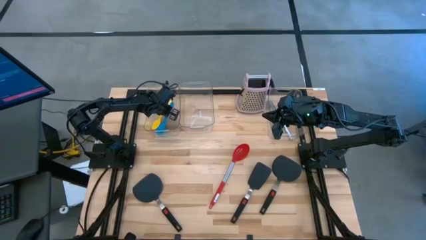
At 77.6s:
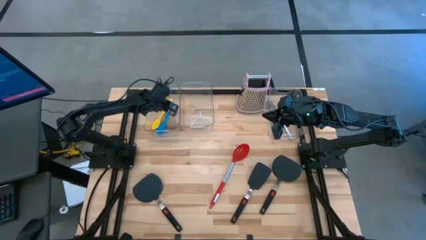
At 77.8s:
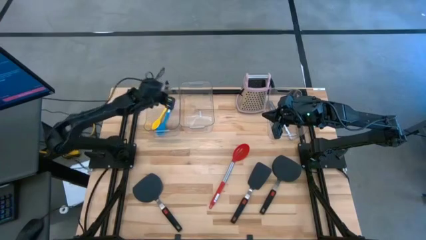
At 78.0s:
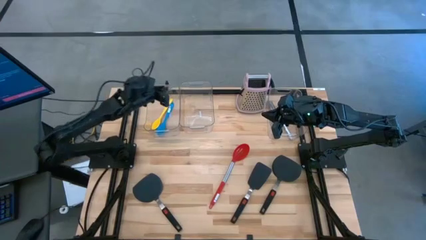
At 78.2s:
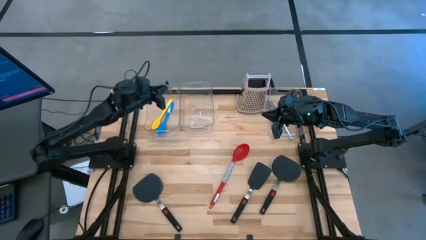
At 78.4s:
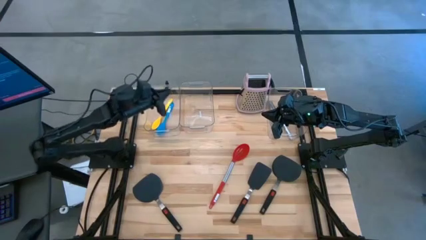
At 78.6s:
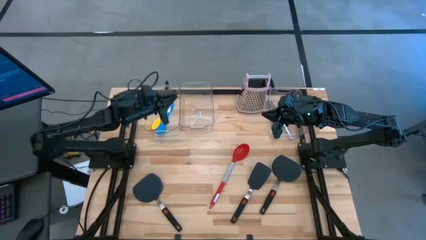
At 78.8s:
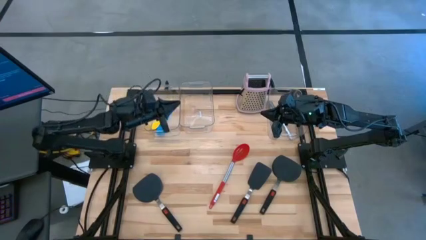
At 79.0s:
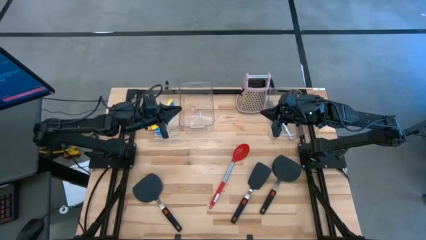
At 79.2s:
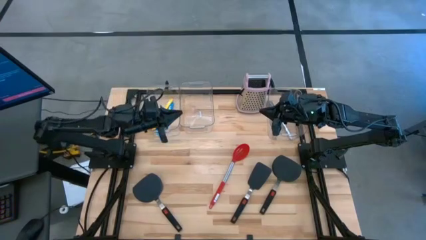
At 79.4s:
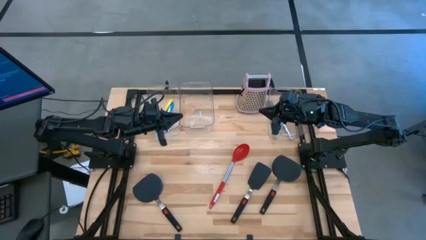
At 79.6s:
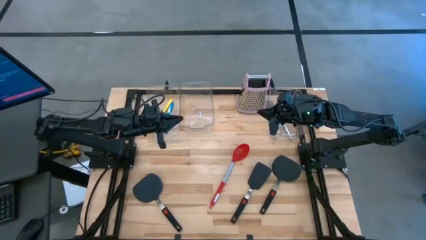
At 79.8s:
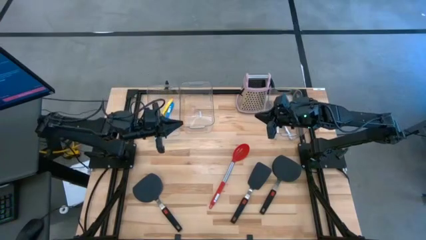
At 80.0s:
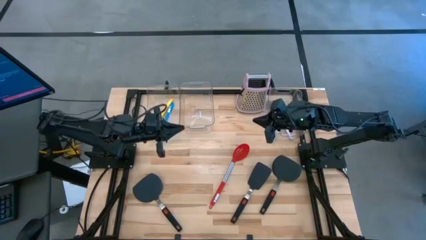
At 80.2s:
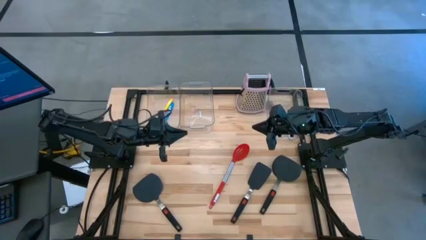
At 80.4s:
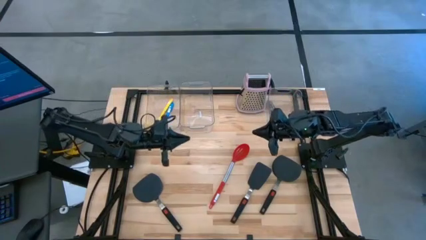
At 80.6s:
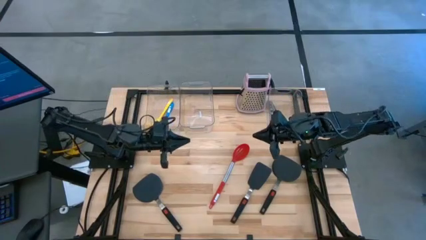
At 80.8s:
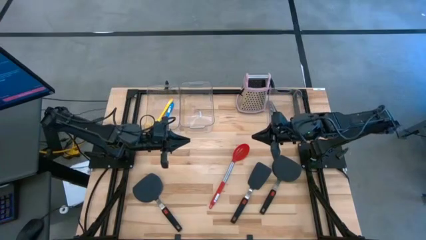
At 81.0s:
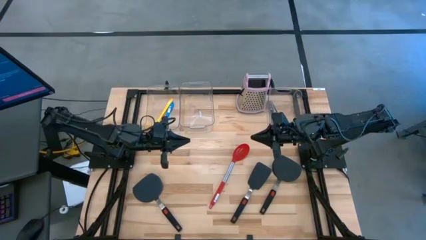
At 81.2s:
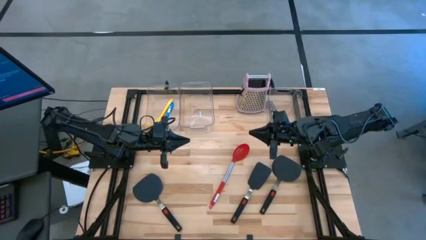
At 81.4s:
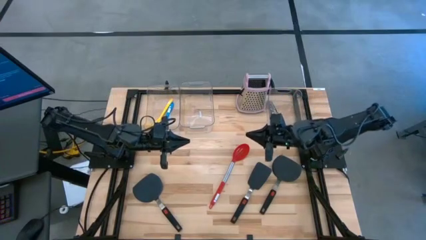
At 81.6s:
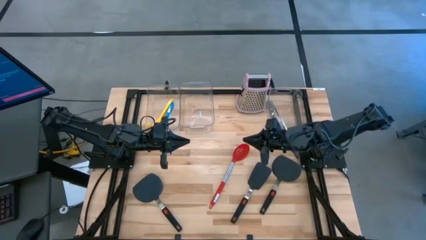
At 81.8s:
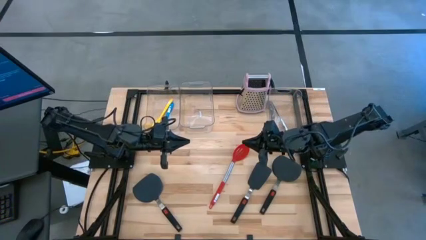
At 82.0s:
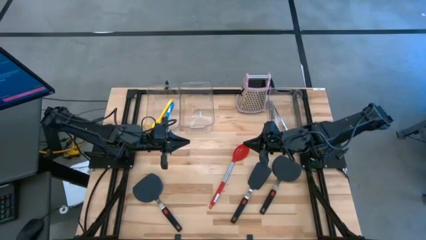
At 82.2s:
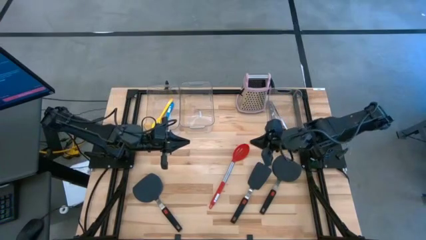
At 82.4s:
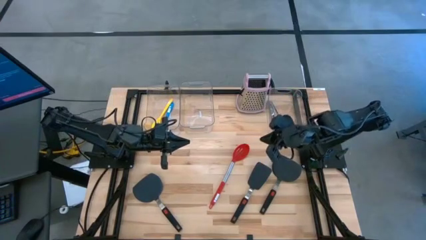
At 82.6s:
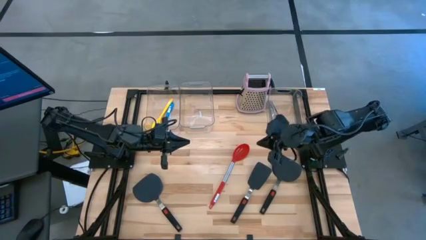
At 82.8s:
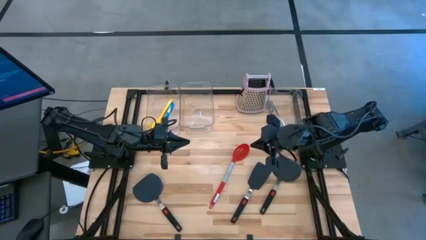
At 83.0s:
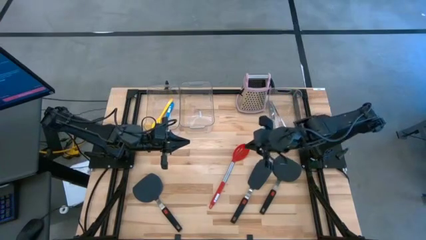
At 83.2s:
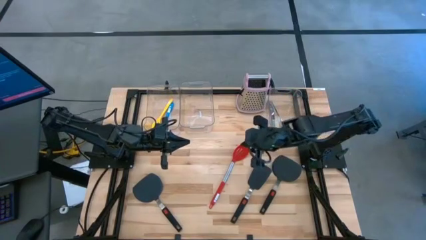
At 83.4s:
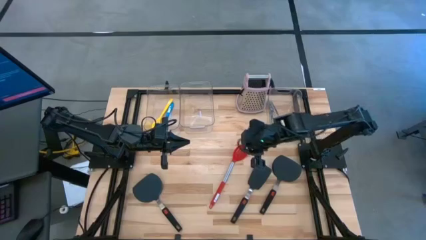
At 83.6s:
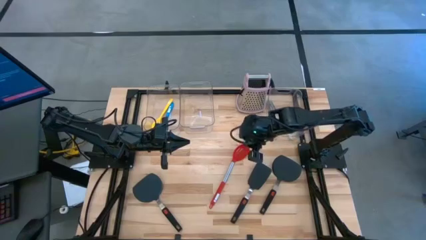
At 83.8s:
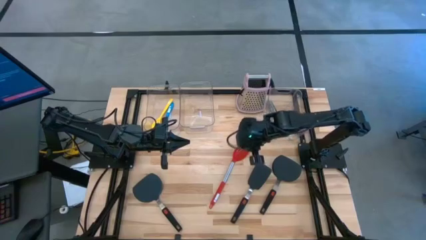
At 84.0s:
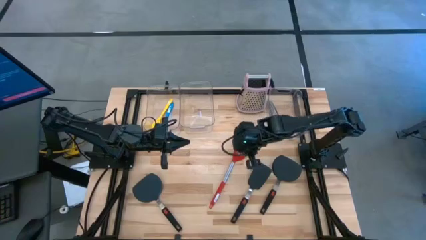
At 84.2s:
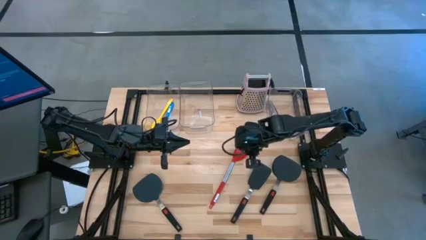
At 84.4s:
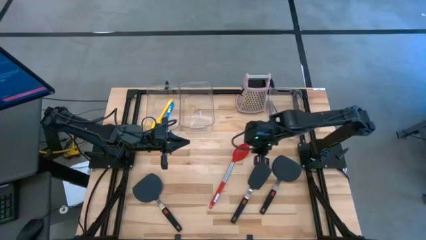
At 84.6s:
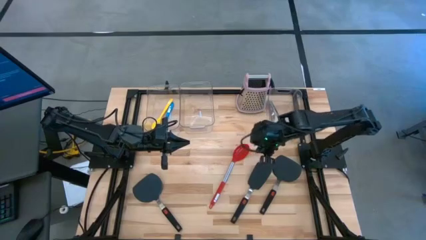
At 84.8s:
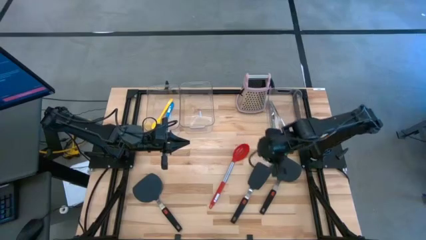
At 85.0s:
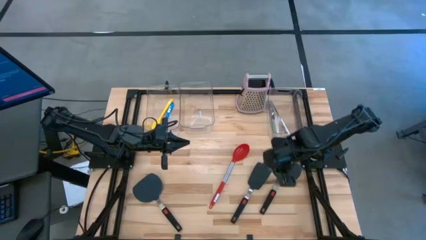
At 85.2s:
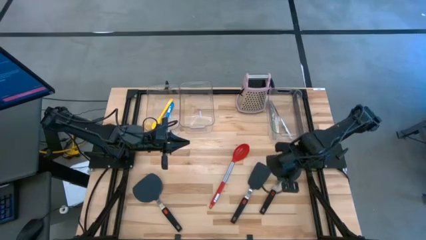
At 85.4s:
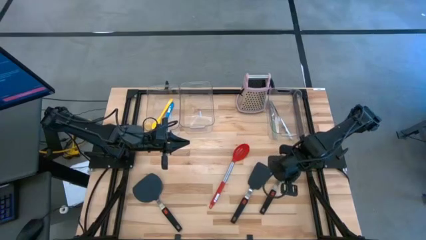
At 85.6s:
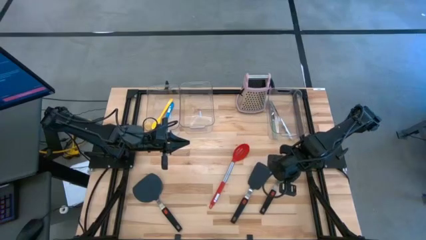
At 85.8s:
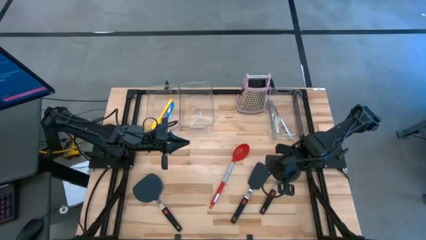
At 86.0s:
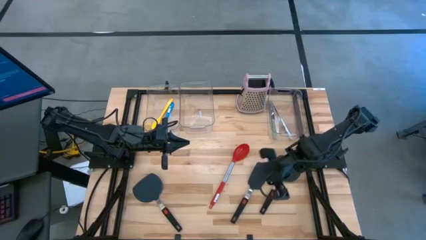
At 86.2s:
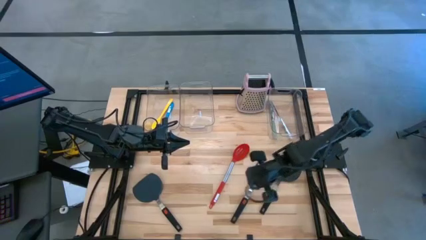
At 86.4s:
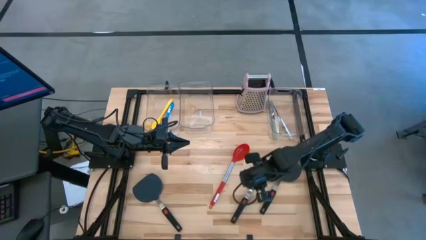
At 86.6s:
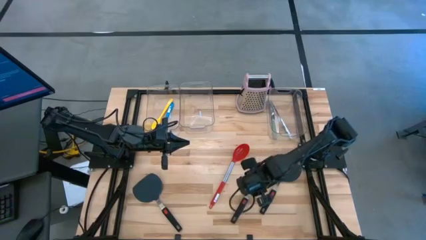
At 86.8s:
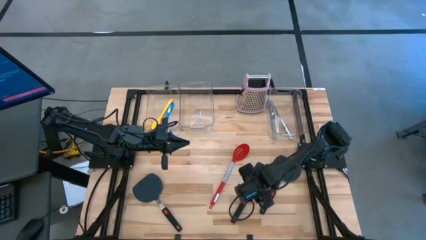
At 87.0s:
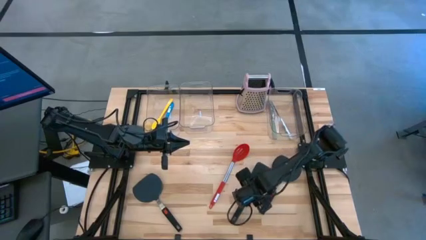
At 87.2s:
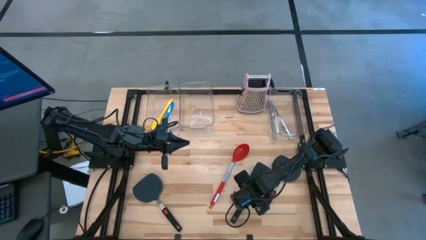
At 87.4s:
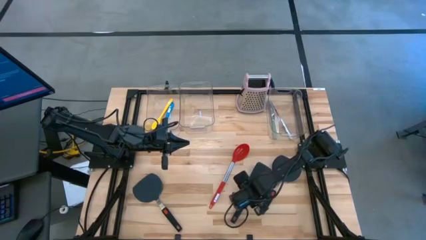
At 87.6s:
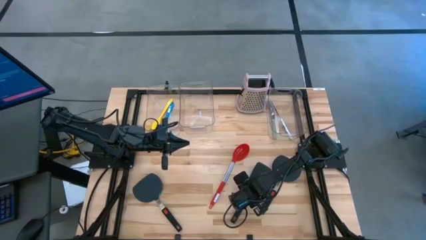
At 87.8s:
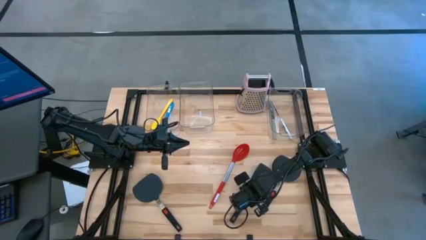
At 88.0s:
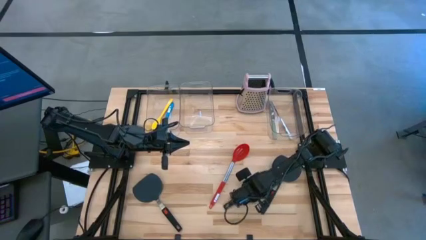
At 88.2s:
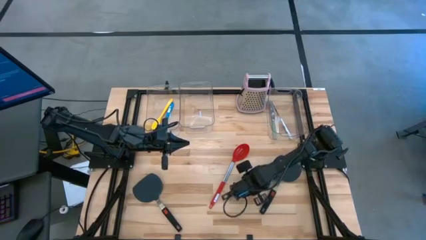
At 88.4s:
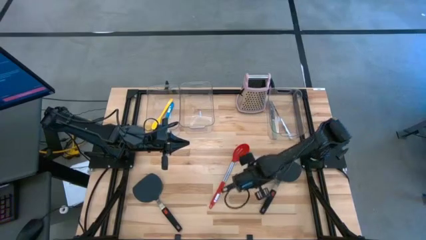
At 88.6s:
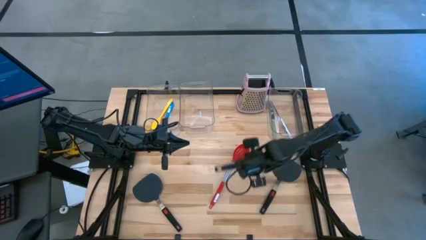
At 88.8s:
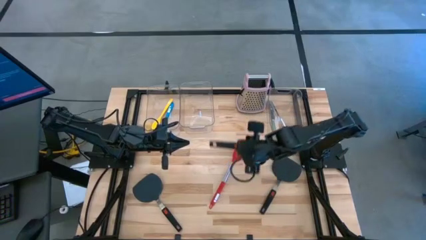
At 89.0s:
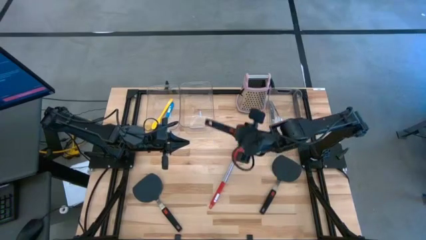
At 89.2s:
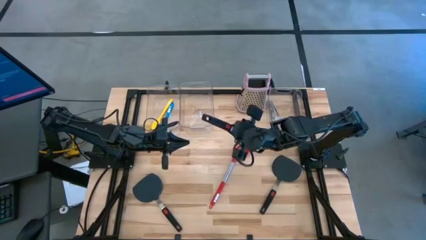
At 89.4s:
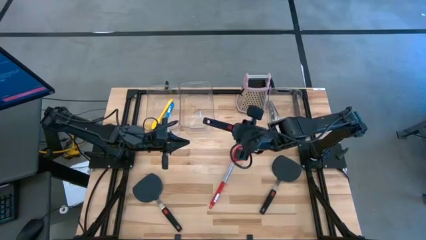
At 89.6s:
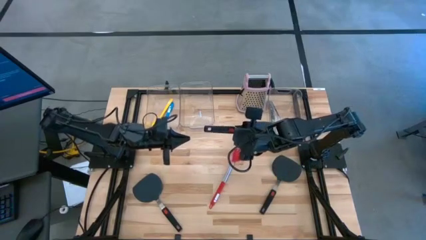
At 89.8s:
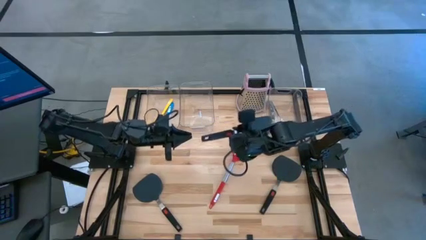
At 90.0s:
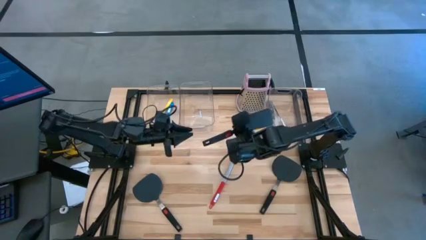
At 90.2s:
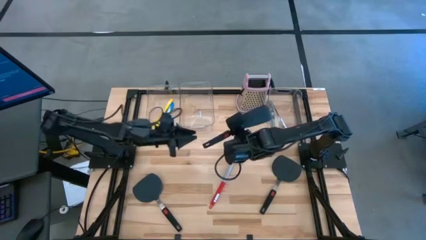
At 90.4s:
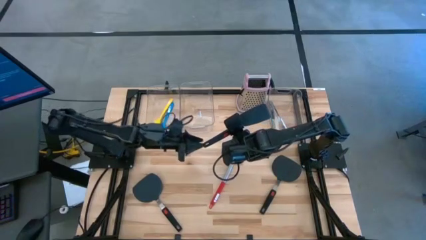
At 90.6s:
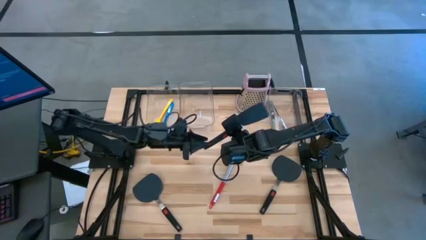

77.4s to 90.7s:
Task: Pick & Place Kitchen Items
Put the black spatula into the middle transparent bin

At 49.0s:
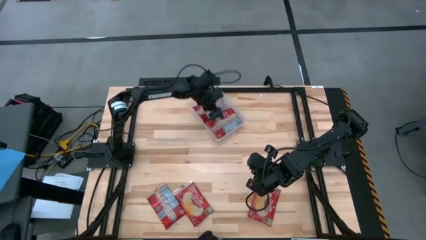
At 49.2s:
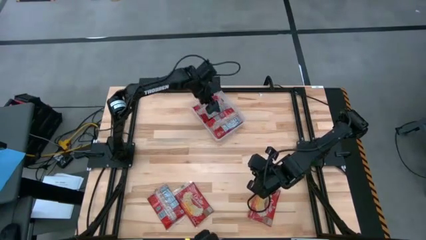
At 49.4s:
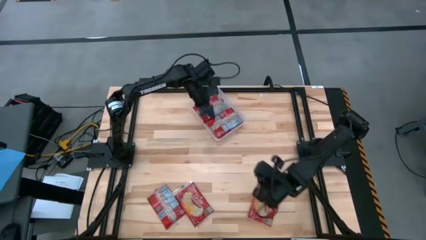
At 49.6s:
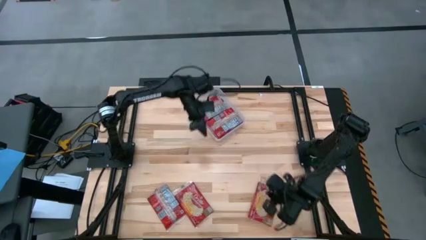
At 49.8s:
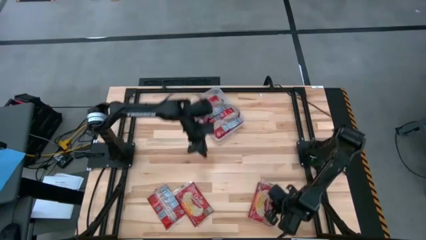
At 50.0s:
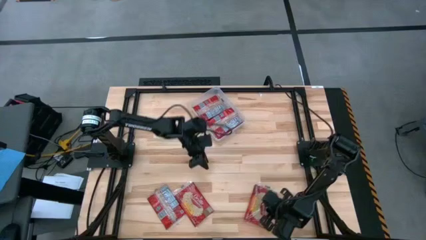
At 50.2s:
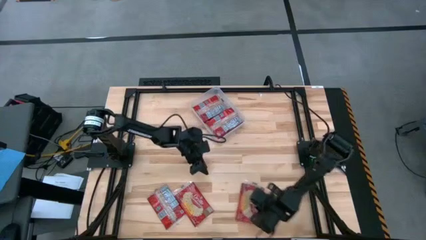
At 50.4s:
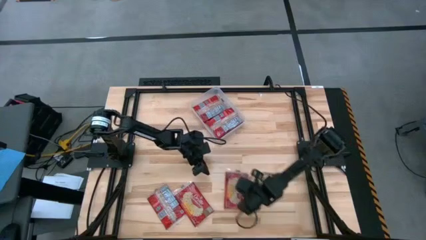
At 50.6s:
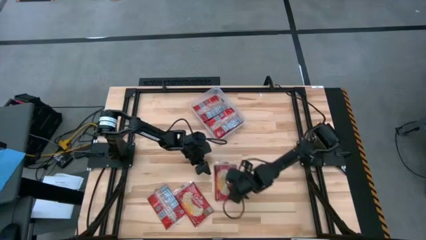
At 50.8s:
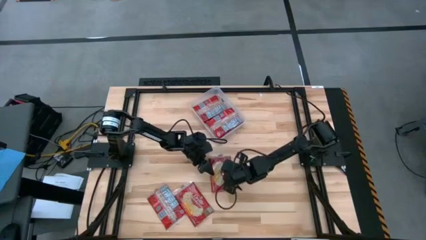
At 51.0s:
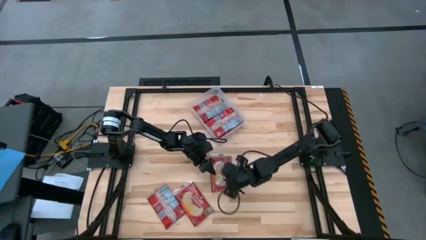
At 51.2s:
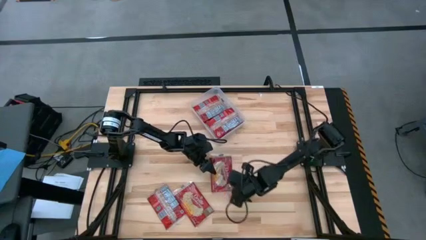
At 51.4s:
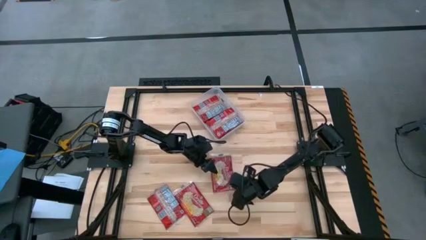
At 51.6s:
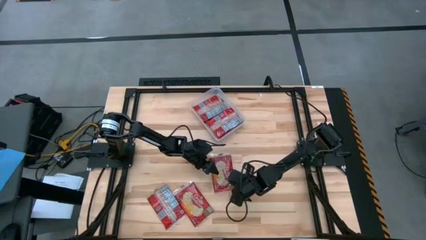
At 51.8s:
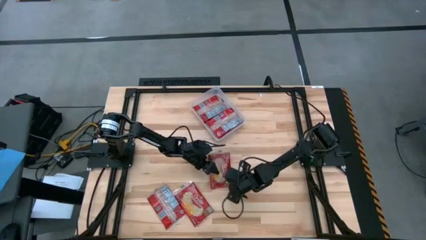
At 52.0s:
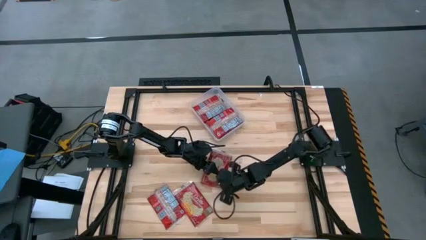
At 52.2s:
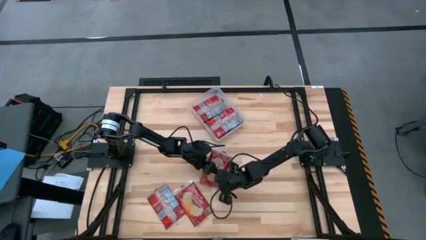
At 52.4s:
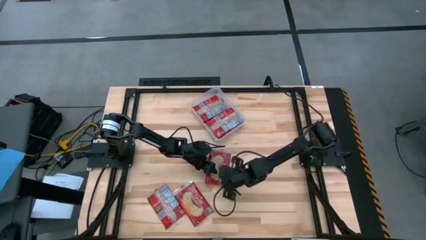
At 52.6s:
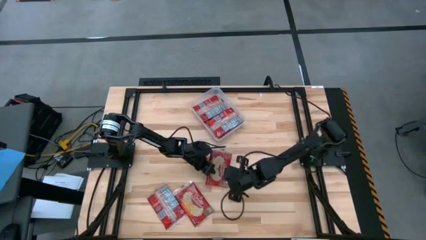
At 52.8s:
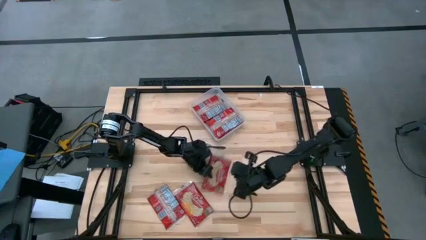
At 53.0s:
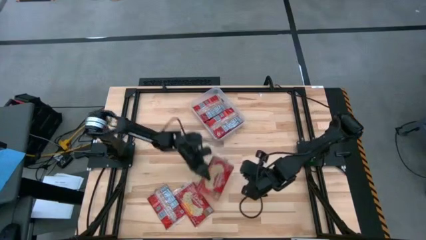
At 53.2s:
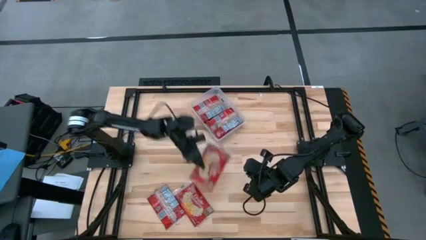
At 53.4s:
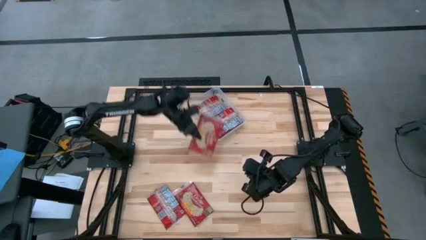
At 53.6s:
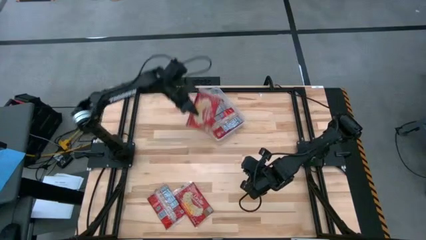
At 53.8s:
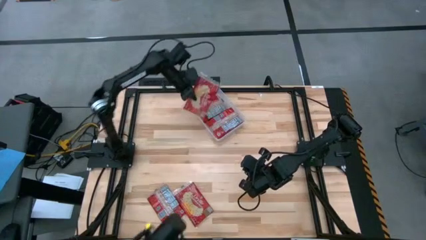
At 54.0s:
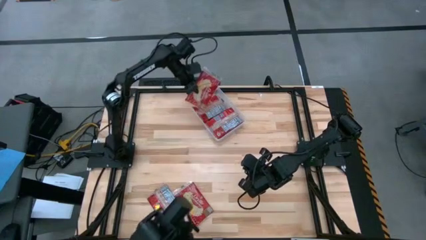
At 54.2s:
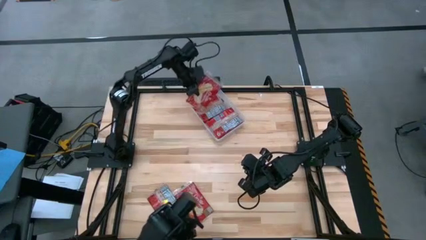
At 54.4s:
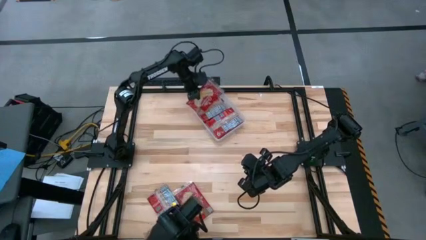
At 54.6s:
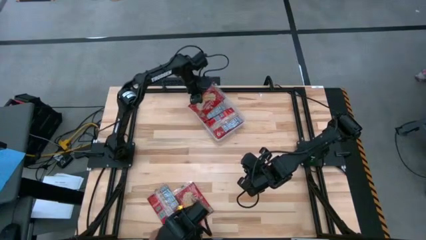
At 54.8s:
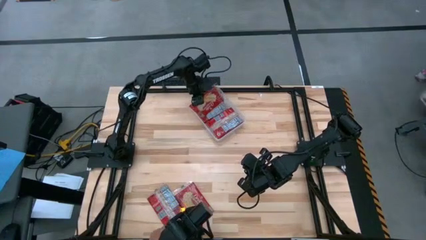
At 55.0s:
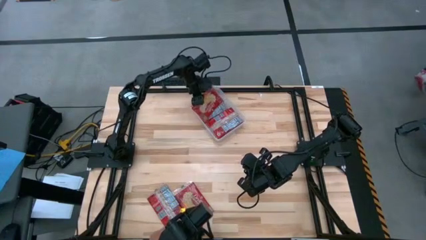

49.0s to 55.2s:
Task: Sort popcorn bags into baskets
Put the red popcorn bag into the white bin
